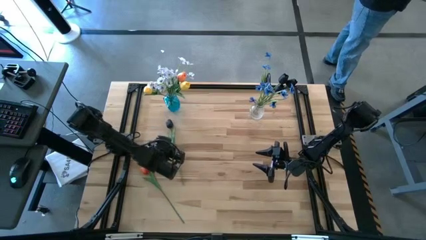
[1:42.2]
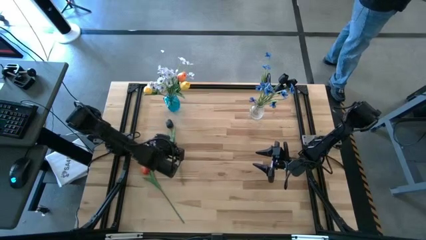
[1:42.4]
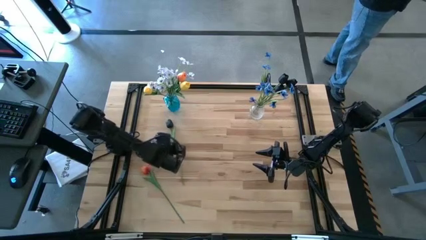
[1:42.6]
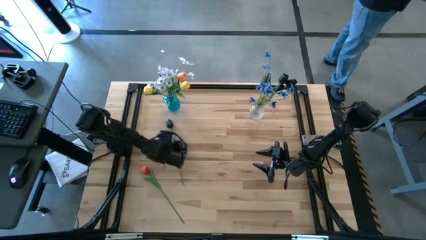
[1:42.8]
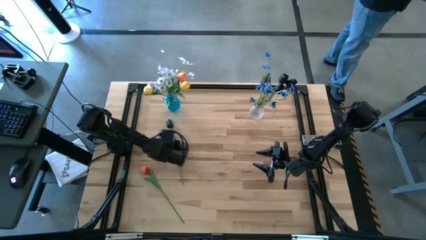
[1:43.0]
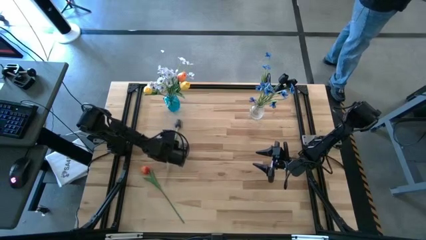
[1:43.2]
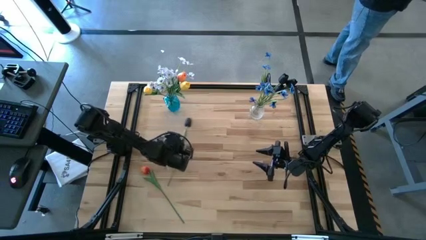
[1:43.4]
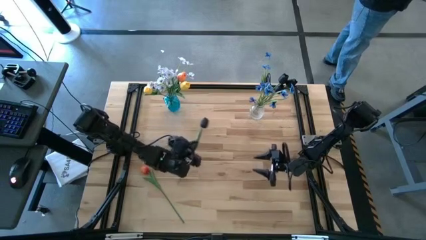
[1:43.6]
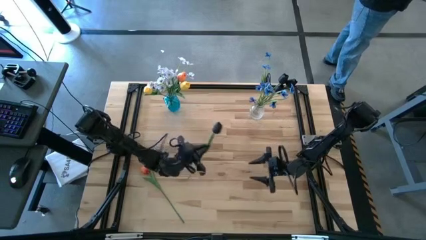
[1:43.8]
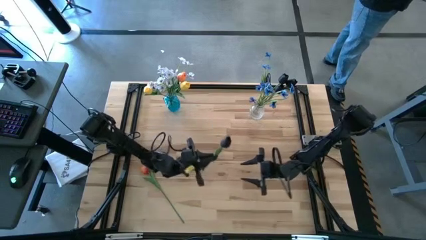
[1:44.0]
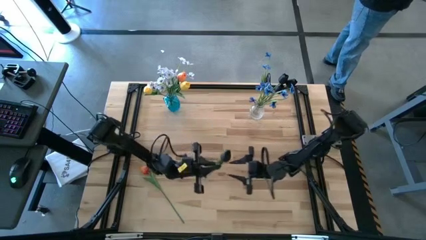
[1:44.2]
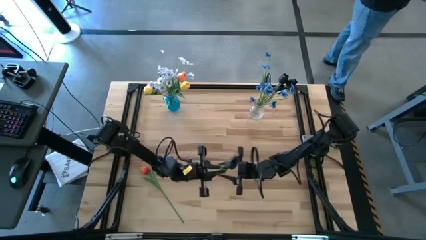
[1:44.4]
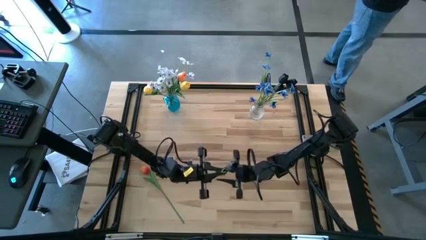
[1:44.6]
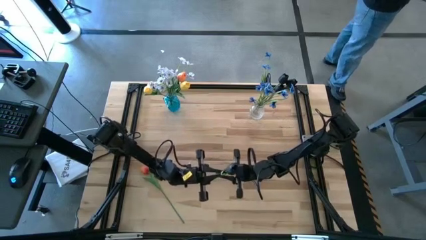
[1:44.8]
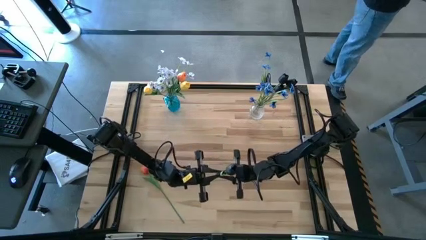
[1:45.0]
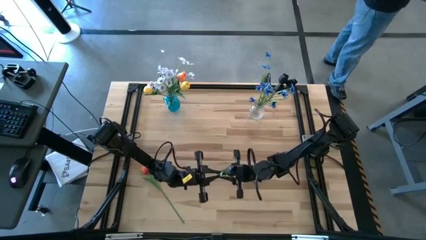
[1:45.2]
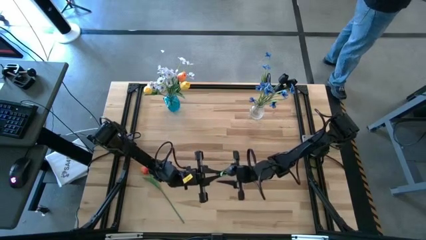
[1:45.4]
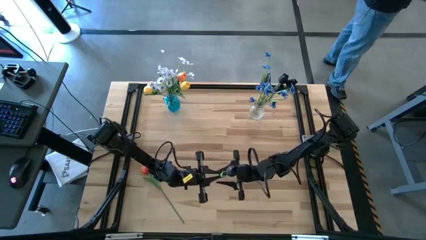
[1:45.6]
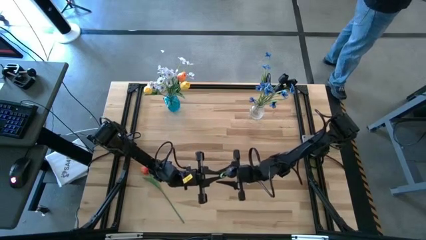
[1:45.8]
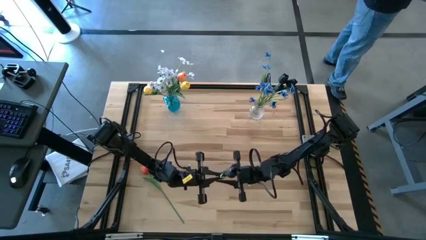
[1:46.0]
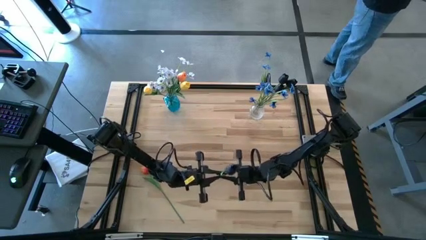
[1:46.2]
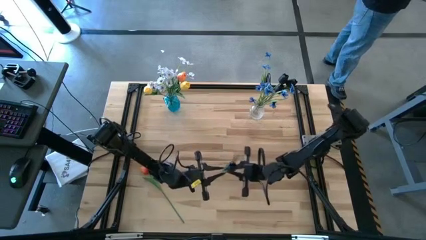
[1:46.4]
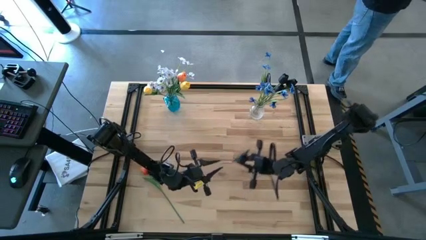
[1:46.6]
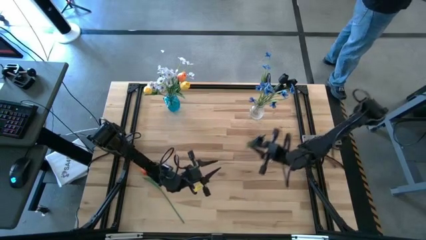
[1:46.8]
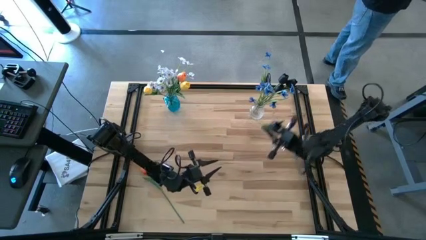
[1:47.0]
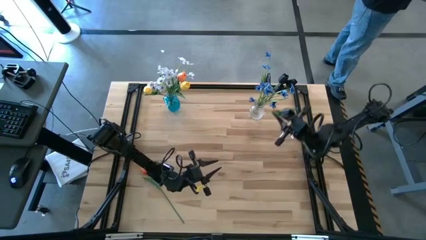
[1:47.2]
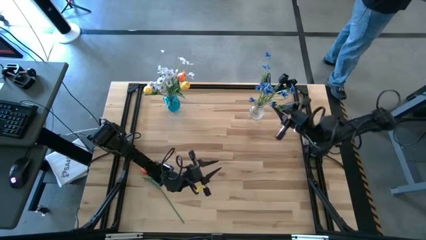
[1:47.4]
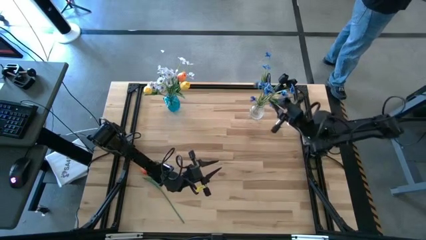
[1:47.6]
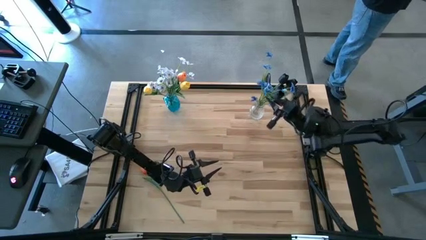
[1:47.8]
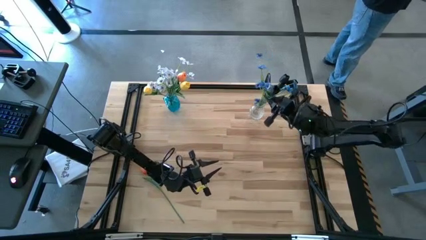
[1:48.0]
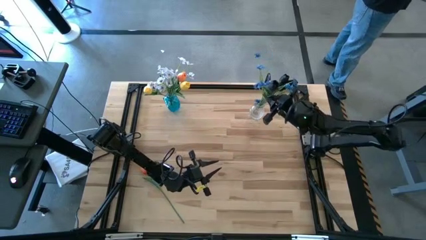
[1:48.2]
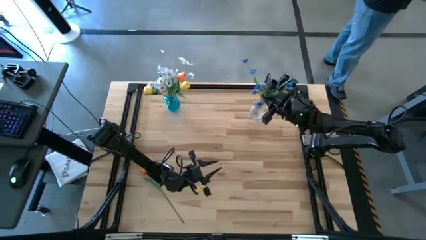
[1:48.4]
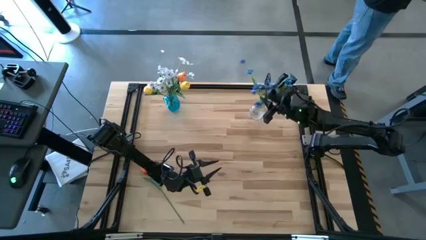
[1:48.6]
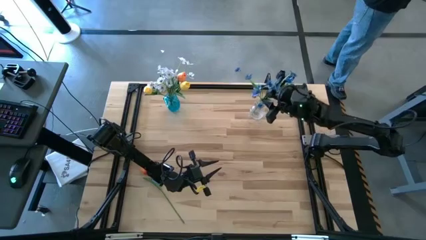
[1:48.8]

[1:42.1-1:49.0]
Task: Sort flowers into vase by color
Put the black flower into the transparent vase

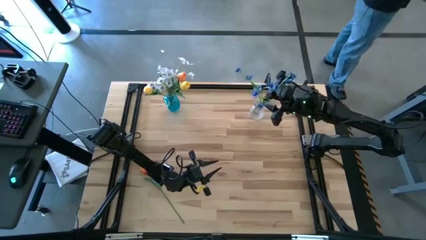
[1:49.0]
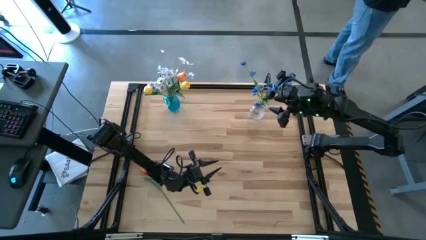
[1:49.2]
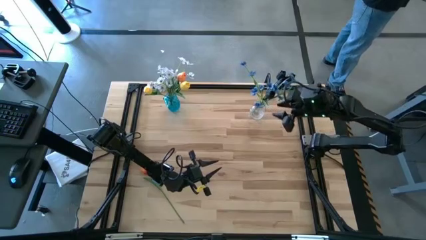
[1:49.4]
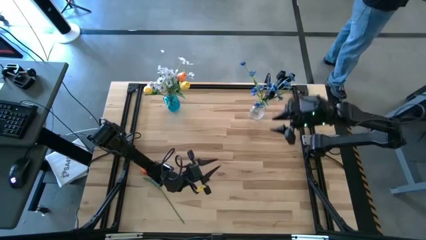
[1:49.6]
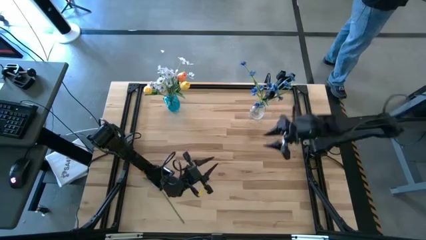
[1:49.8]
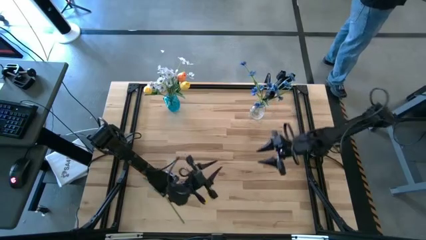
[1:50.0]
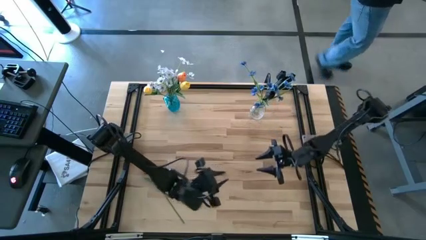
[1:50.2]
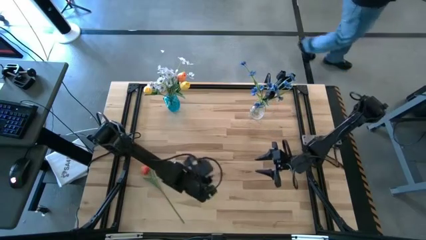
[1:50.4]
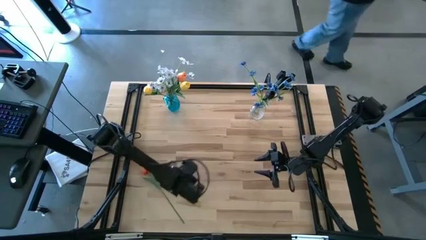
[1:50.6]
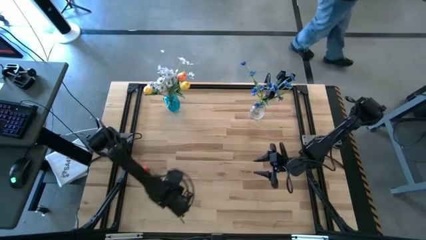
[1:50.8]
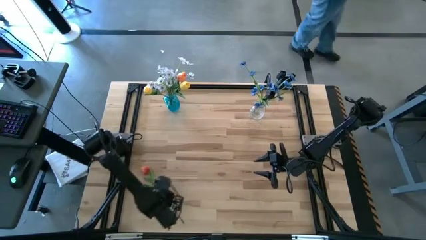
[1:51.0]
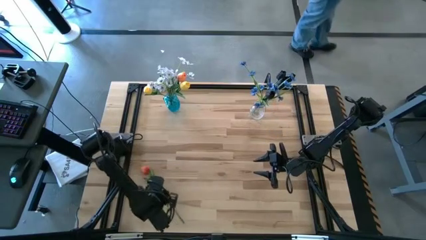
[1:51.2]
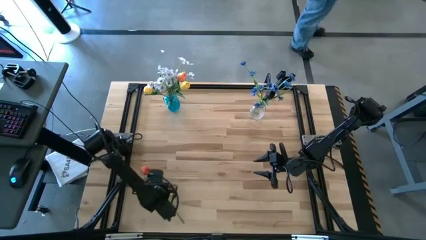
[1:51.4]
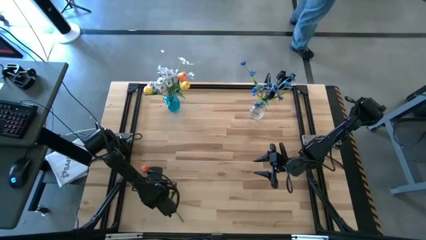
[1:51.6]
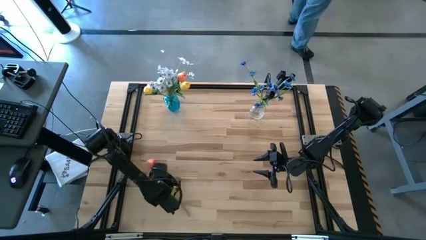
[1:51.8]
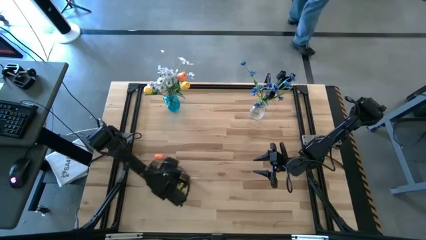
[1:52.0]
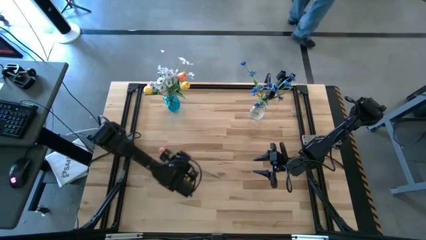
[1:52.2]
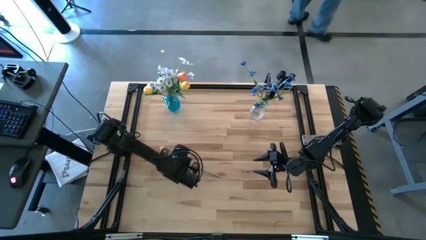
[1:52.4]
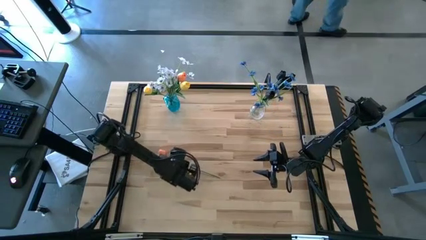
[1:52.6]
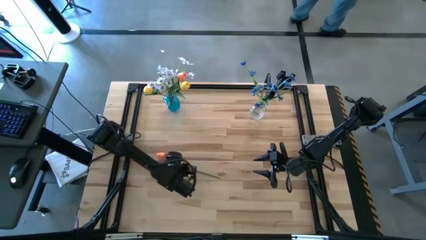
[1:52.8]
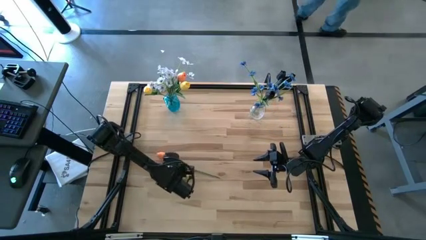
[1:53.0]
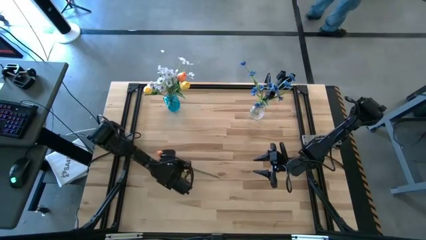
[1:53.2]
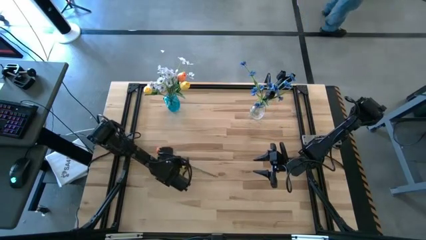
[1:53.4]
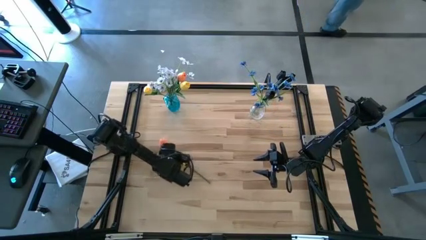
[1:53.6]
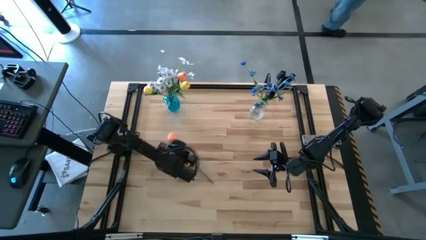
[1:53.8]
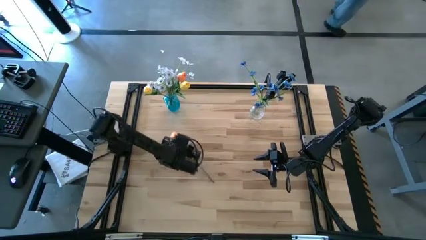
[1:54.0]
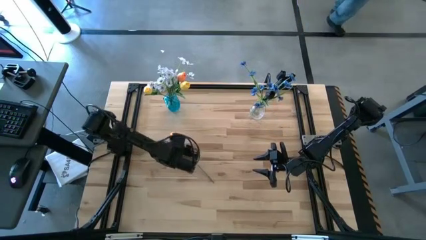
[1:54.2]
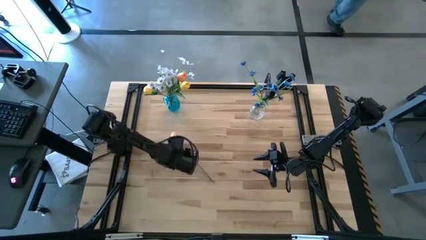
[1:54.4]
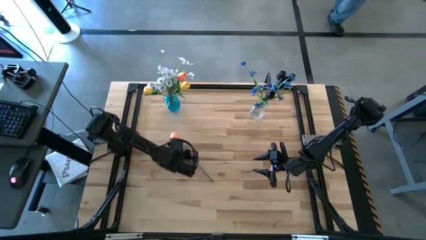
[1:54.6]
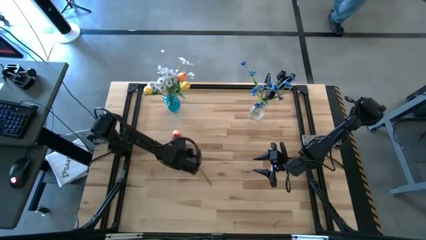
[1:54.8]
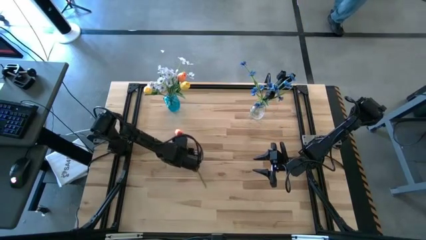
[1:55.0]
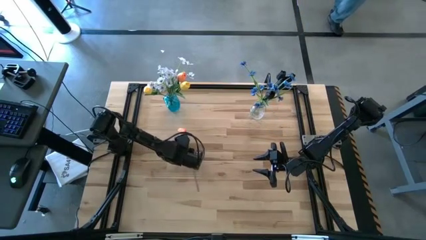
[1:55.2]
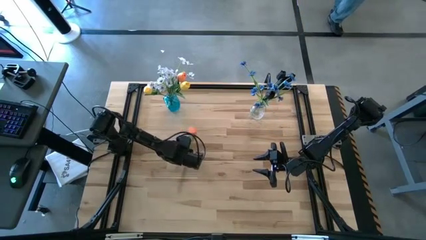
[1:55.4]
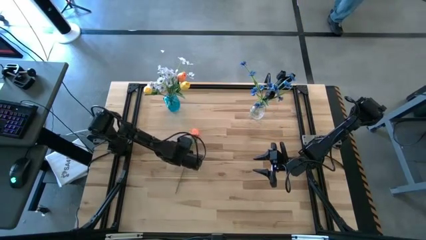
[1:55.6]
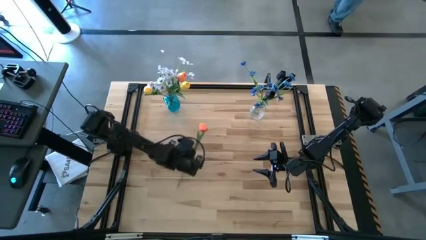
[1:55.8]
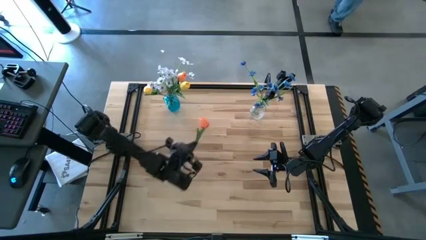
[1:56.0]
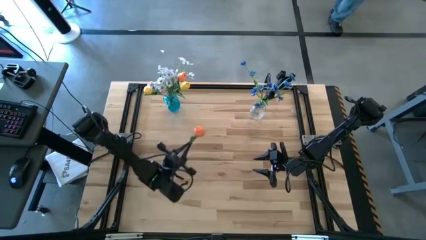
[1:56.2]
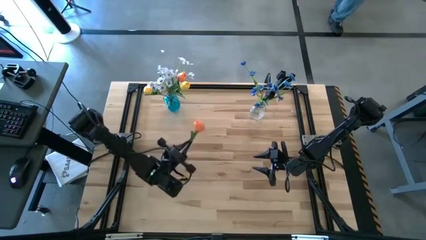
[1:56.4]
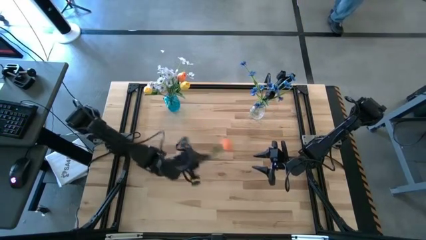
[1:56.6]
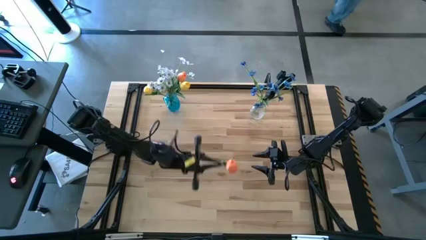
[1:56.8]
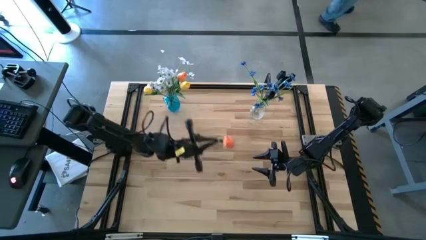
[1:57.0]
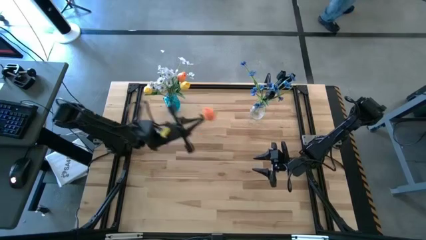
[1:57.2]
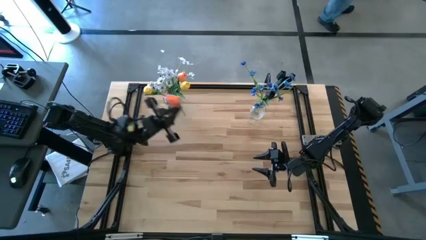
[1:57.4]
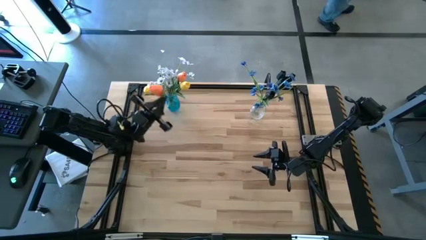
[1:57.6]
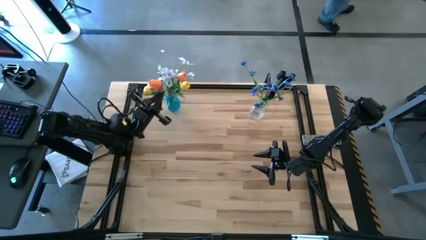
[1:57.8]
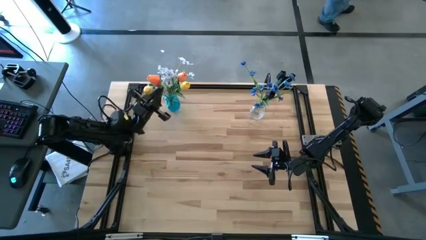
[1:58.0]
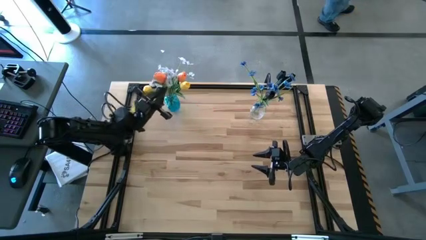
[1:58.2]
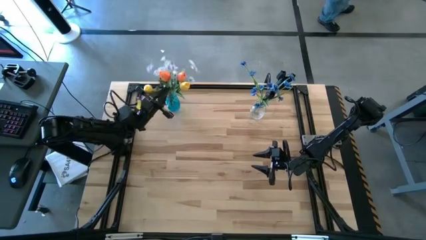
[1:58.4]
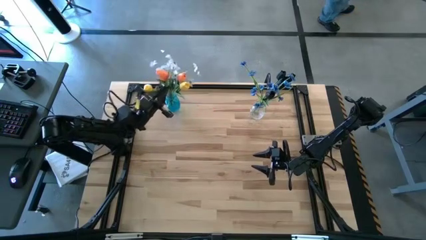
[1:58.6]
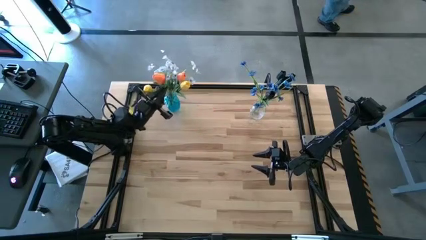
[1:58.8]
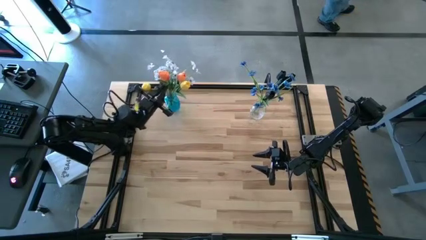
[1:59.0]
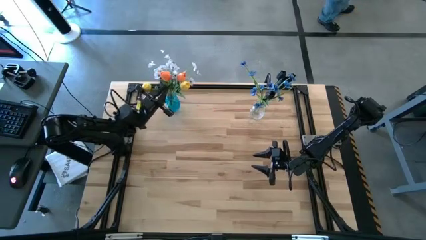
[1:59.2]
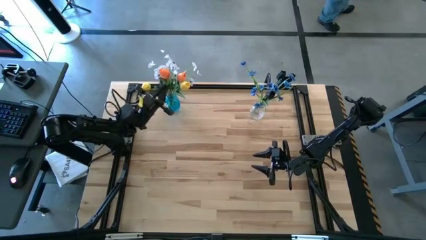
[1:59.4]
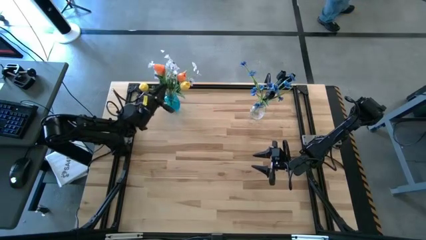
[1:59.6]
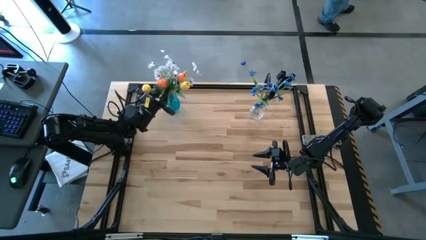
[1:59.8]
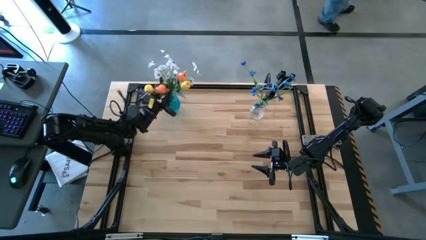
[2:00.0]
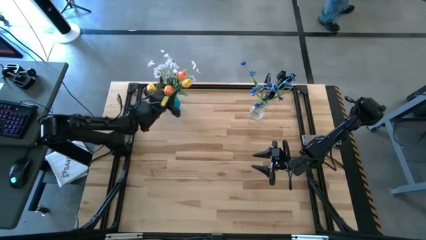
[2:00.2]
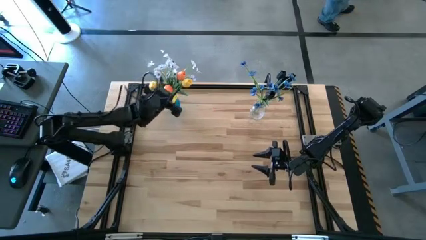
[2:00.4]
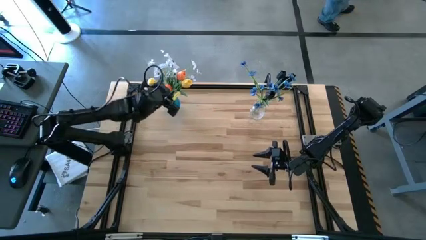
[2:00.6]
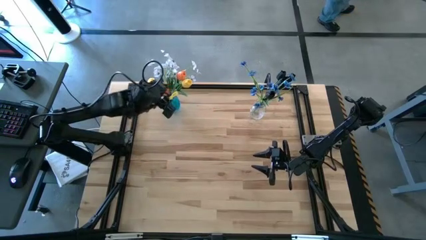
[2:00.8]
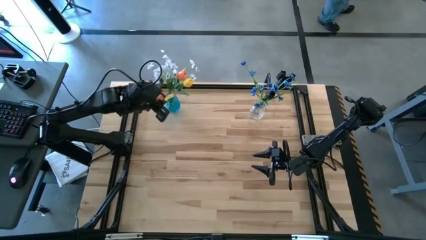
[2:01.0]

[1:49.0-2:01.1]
Put the orange flower into the blue vase
